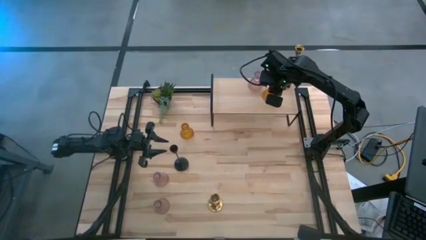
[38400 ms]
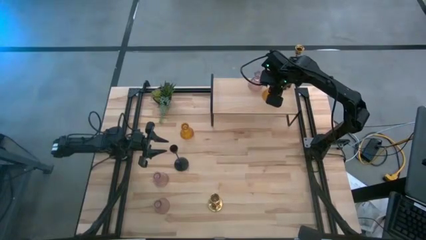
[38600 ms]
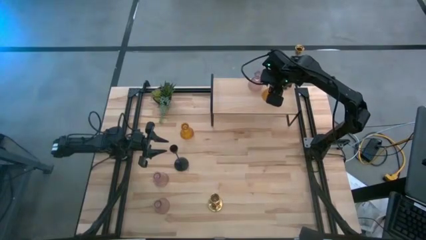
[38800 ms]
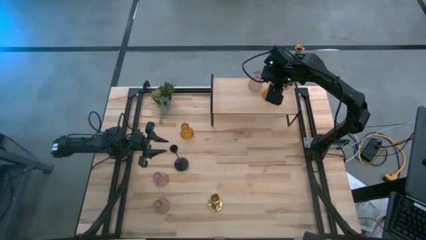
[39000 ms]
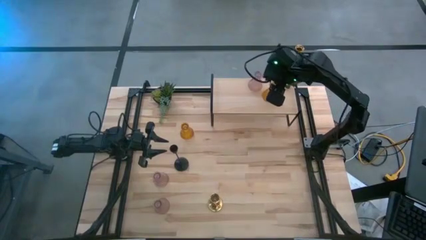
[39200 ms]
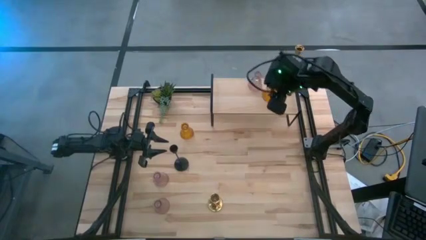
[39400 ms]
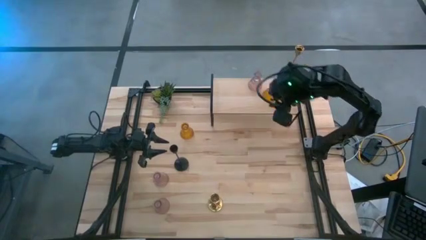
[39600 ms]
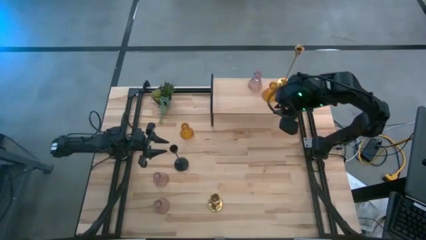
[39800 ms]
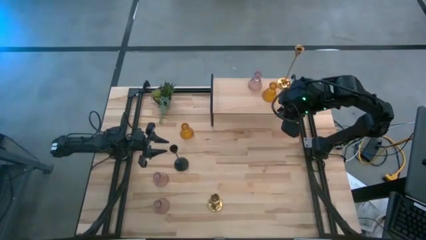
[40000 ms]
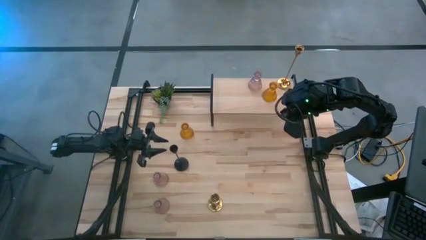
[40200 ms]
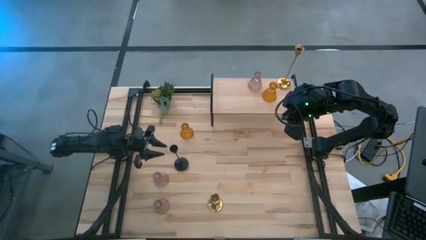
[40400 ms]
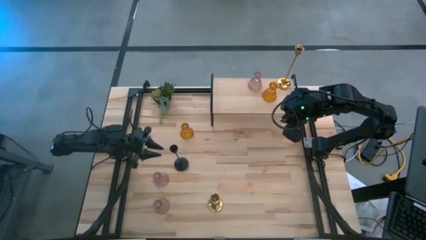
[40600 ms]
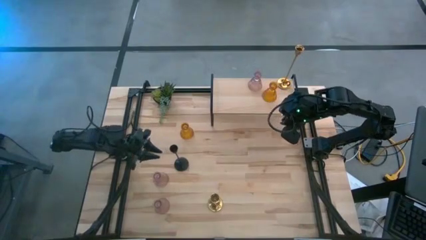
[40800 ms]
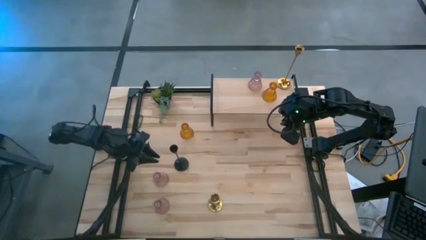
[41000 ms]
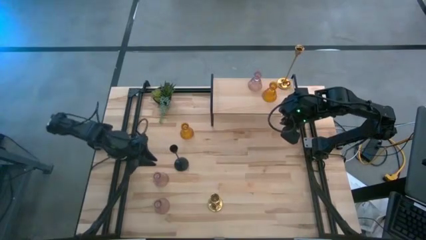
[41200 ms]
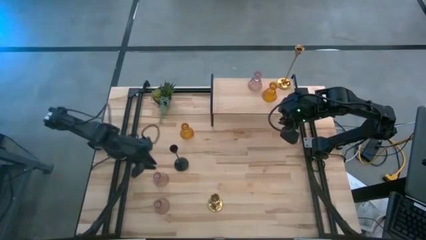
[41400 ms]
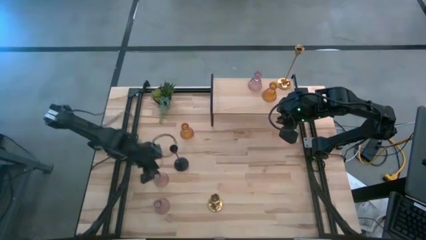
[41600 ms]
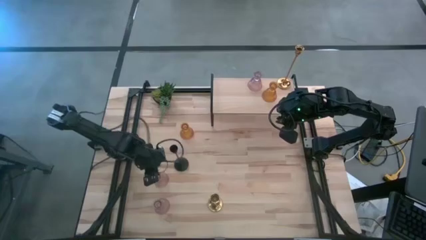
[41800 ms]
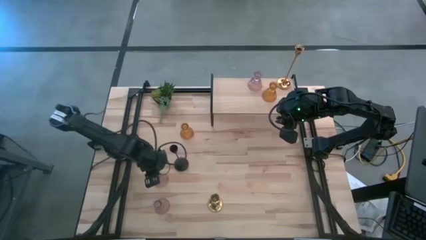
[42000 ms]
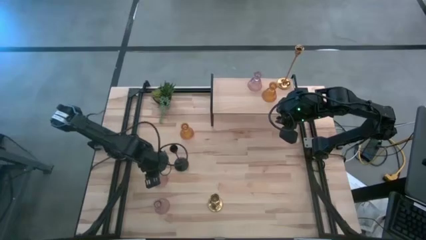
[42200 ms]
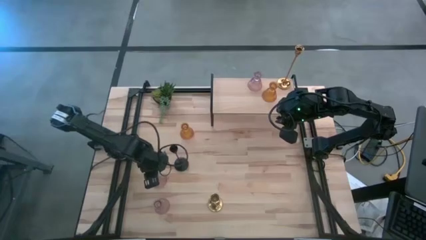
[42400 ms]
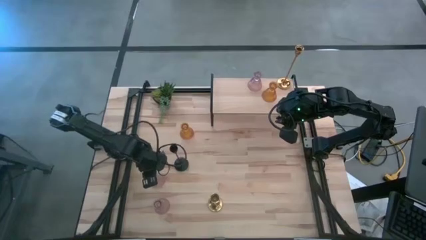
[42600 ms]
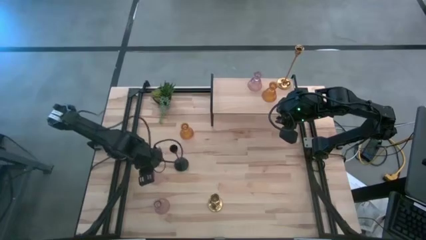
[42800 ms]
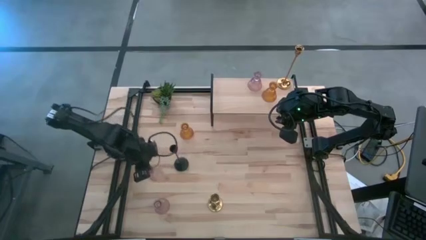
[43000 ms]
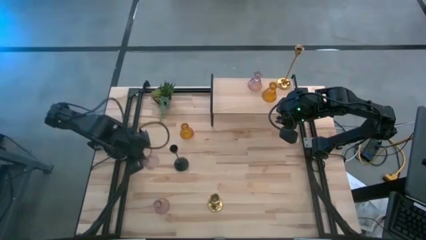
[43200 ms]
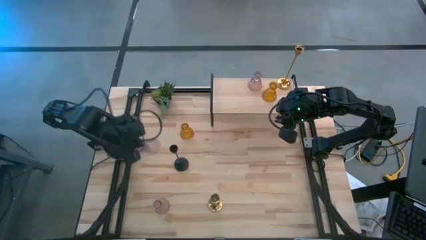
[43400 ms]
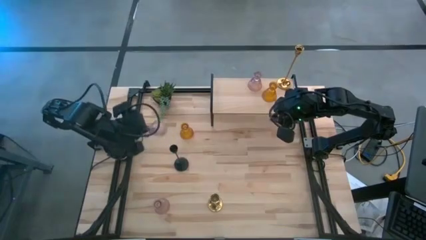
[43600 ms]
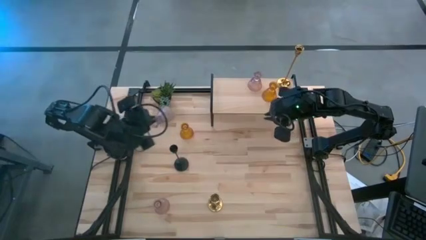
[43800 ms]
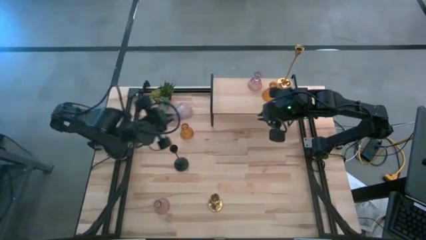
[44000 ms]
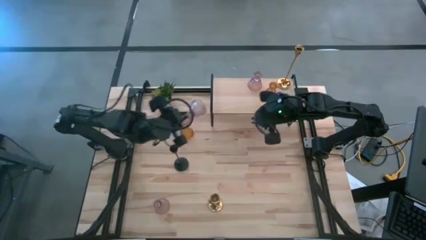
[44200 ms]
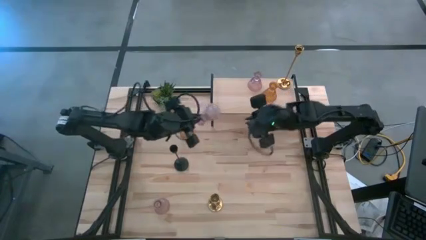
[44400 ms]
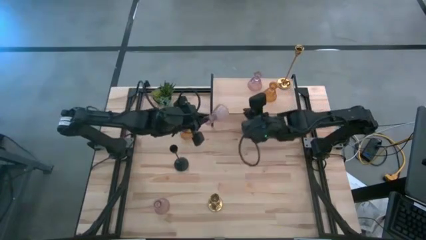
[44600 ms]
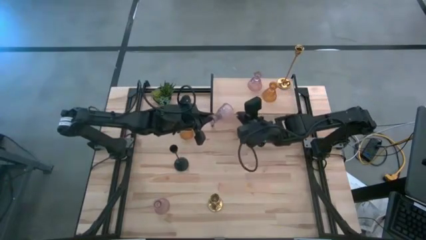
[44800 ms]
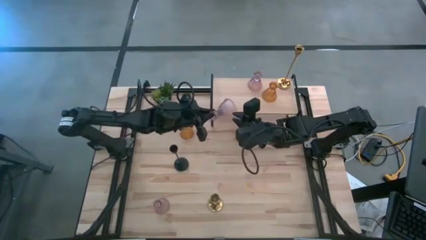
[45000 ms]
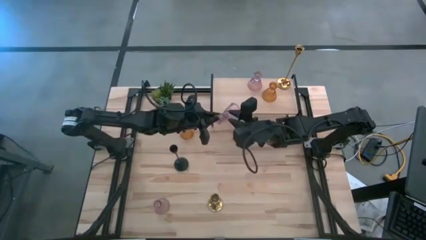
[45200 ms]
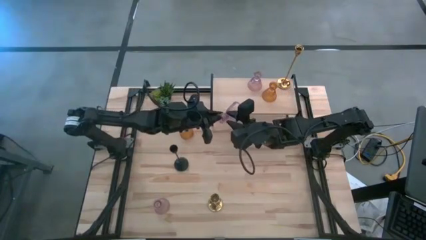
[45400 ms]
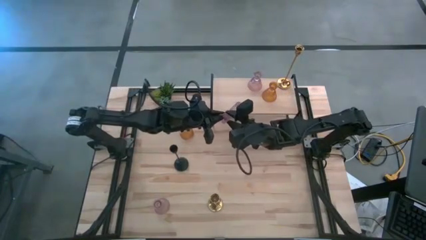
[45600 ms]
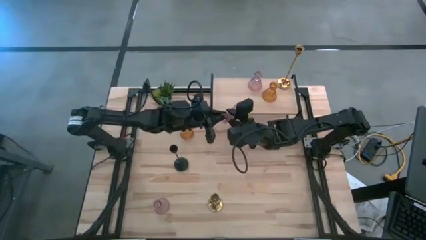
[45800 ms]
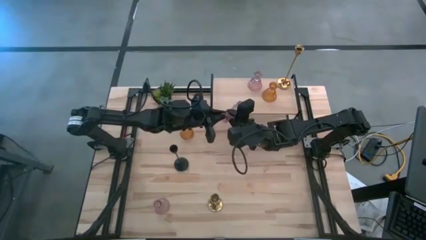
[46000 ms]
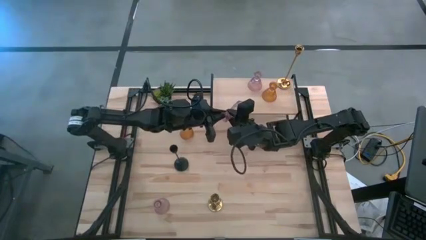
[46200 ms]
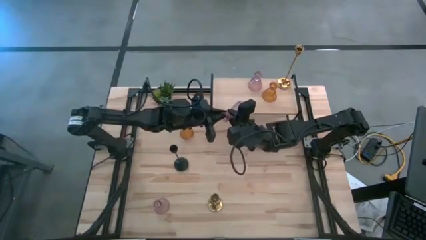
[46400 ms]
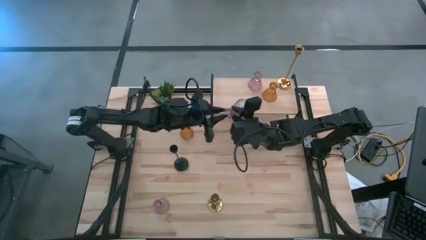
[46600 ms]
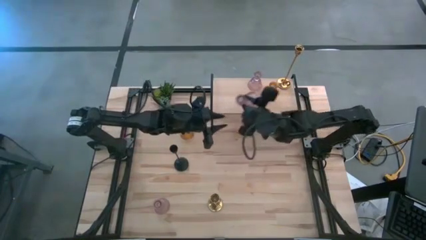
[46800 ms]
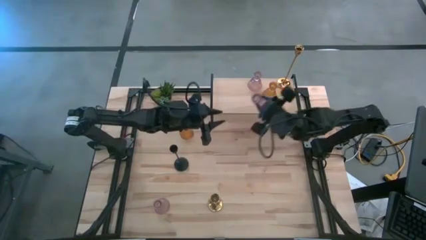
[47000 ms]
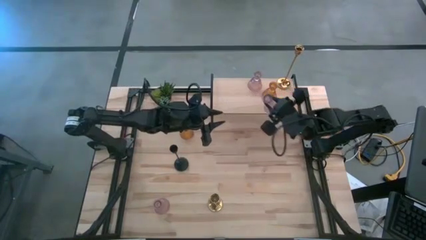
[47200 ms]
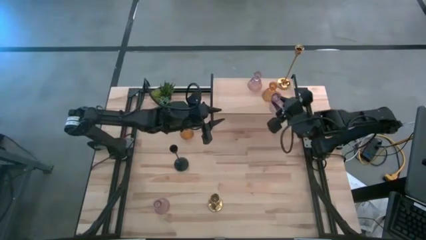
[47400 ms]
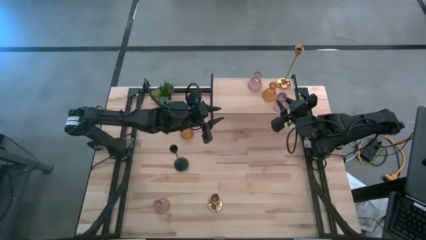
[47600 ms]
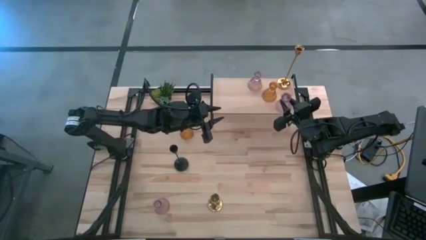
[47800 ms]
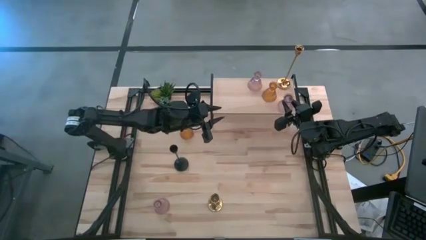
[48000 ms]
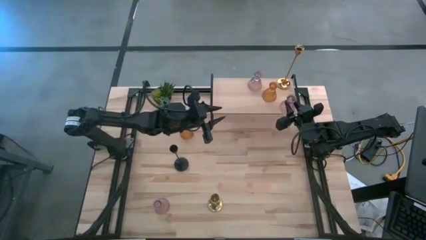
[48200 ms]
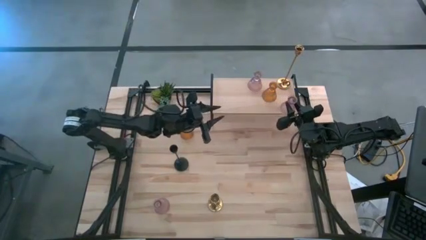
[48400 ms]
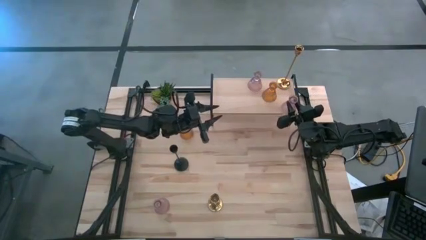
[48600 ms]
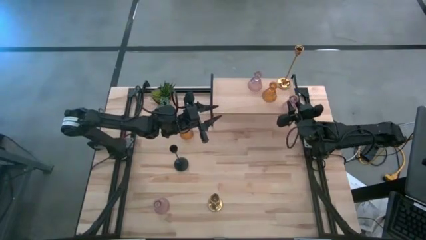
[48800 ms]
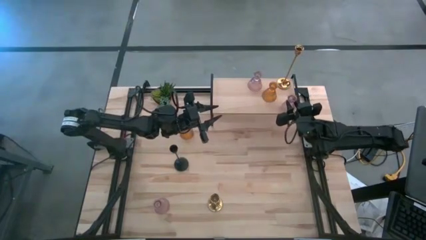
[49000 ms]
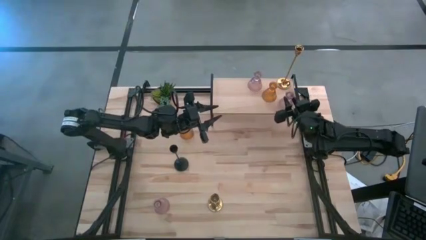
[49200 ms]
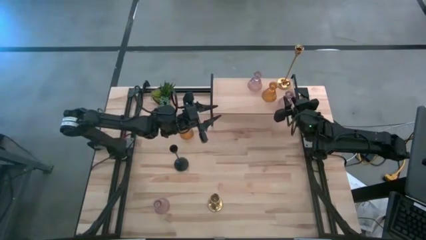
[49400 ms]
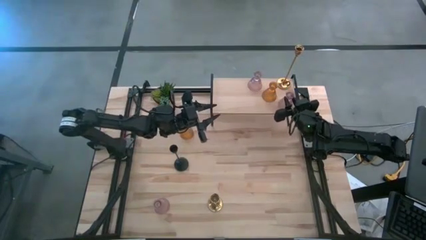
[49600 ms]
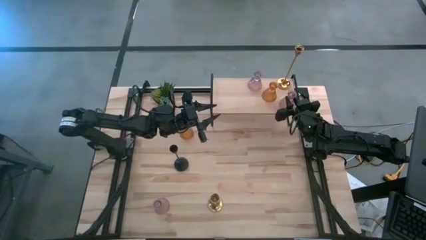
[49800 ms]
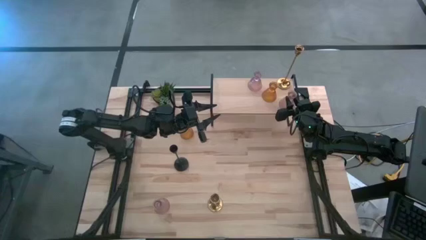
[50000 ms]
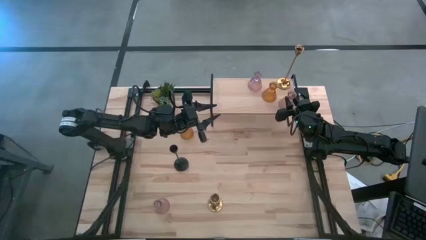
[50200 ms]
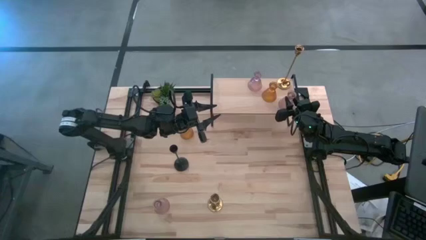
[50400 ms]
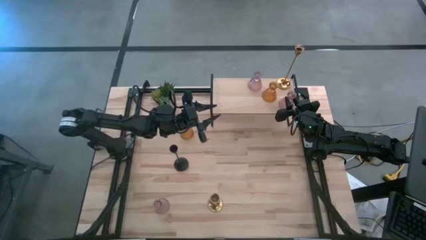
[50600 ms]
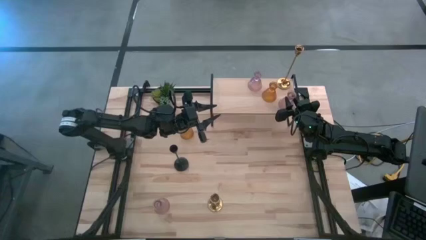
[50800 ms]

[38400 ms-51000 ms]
Task: Pick & Place candle stick holders
Put the top pink candle holder on the shelf
